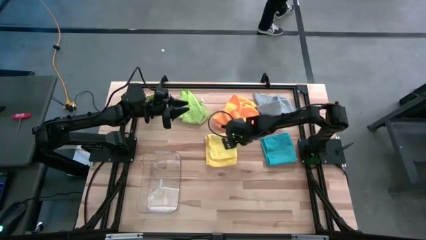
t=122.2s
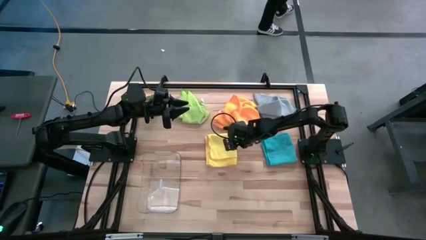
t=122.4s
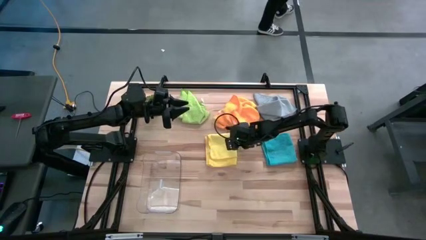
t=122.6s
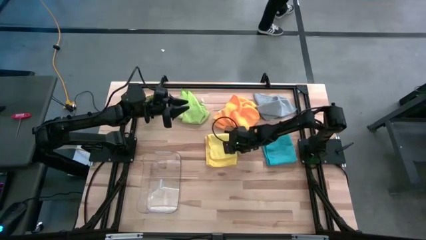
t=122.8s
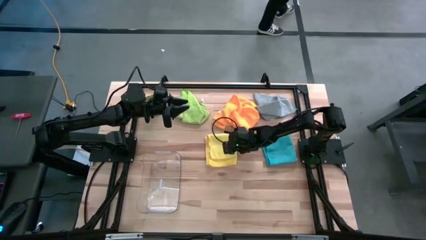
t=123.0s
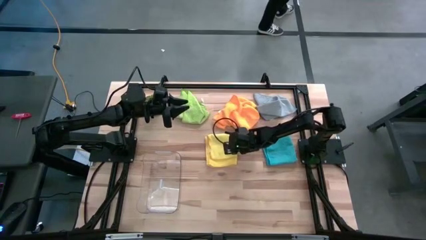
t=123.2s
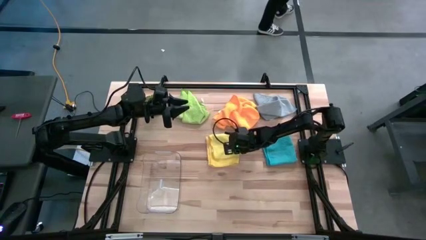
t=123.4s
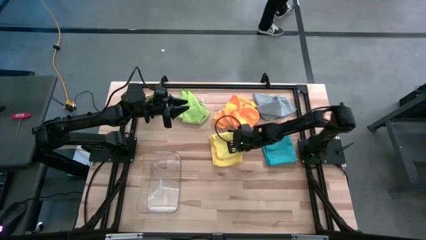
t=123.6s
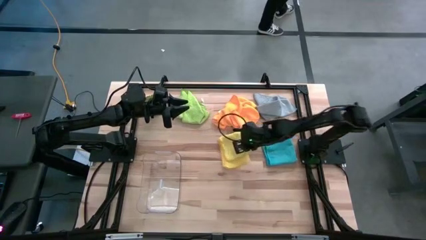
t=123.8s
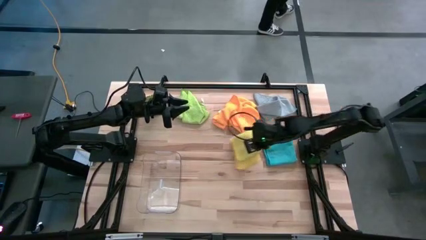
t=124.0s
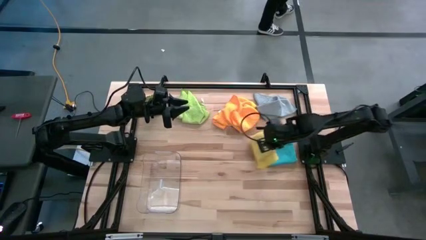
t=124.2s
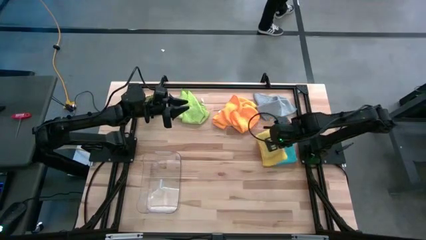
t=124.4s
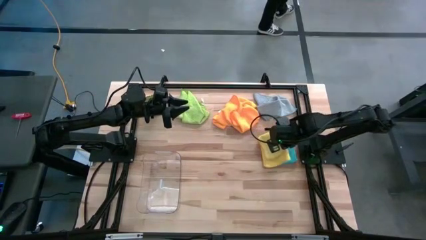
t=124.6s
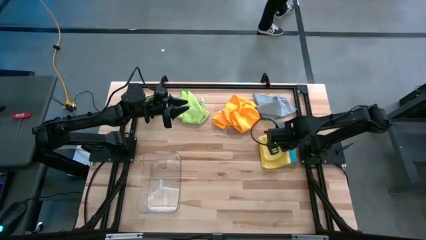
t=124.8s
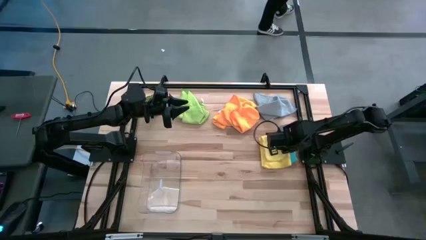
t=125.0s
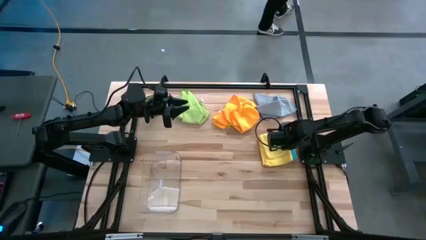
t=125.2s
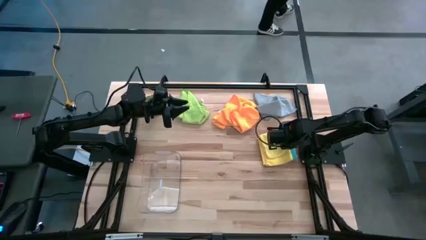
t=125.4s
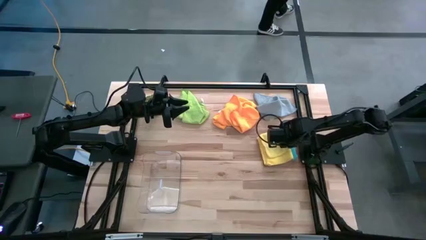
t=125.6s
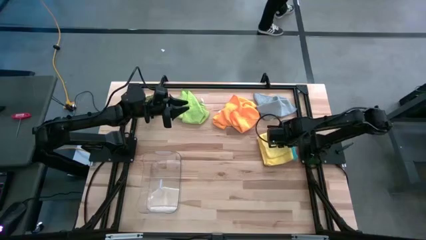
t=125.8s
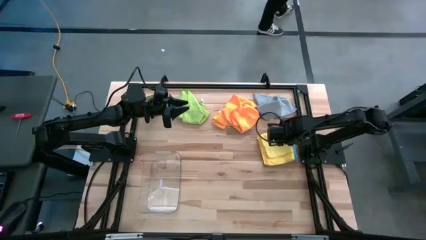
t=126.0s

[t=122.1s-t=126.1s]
Task: Fold microfiber towels
Stack the yellow towel on top of the blue towel

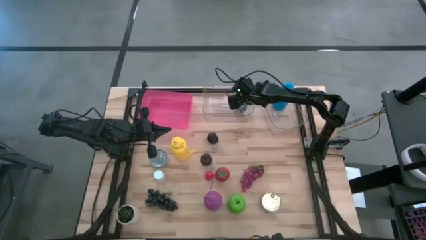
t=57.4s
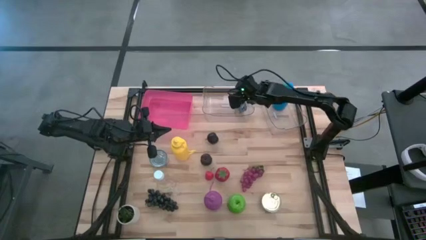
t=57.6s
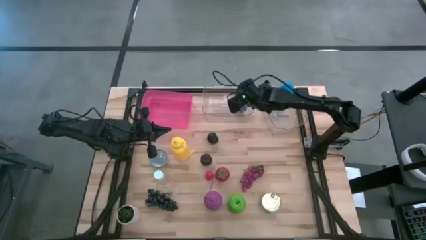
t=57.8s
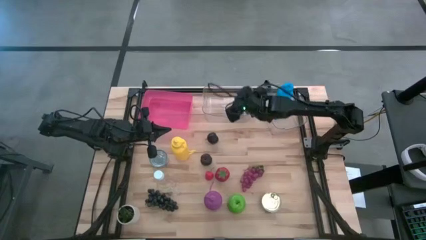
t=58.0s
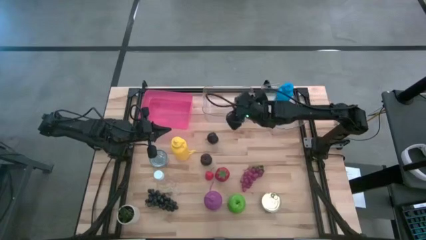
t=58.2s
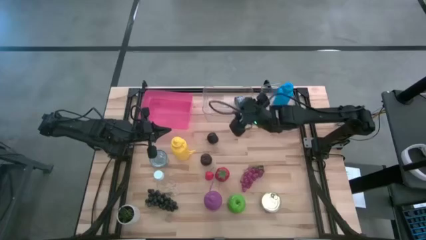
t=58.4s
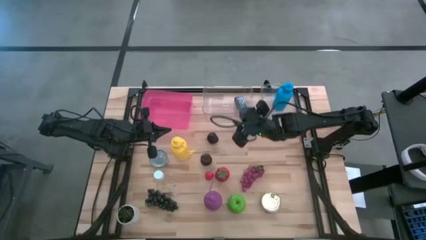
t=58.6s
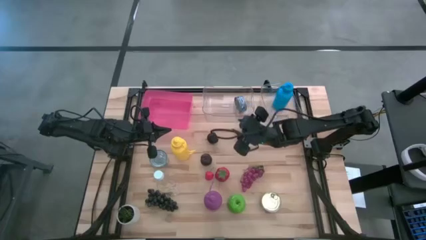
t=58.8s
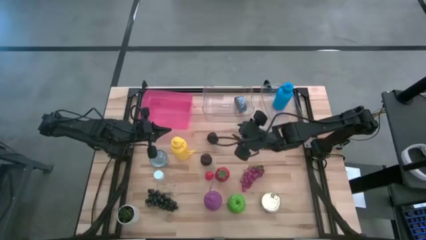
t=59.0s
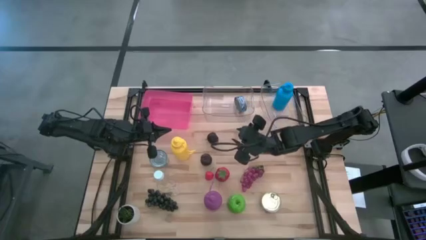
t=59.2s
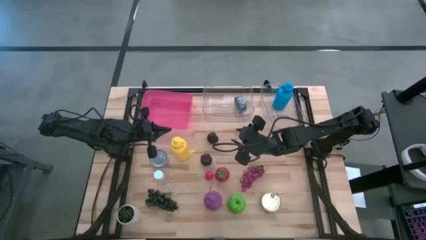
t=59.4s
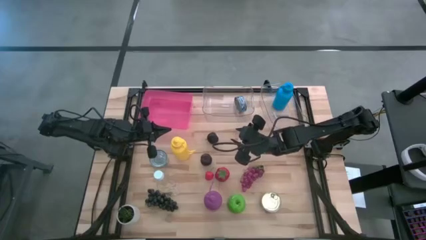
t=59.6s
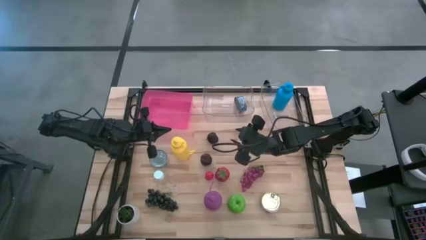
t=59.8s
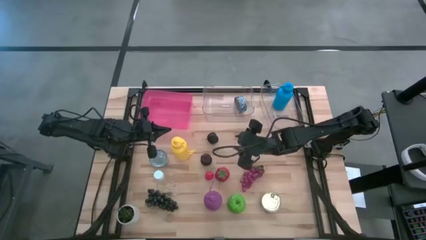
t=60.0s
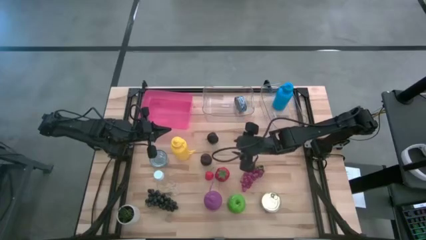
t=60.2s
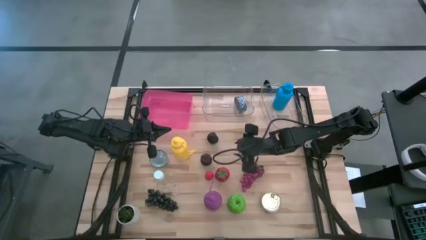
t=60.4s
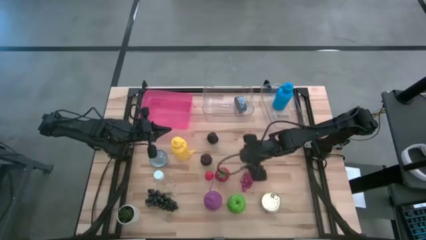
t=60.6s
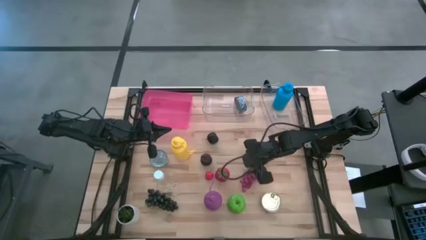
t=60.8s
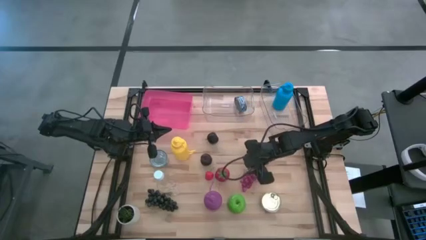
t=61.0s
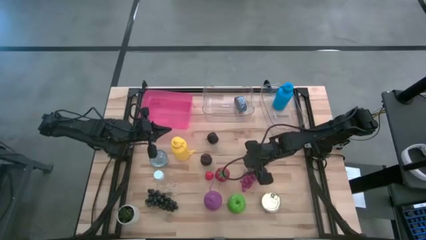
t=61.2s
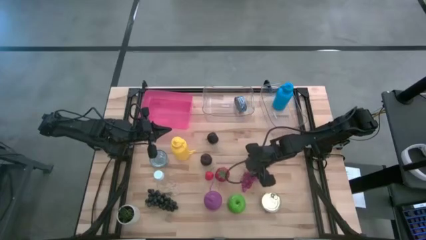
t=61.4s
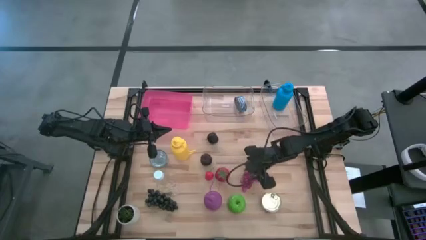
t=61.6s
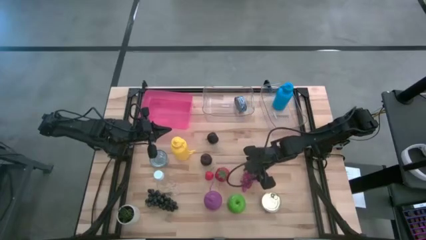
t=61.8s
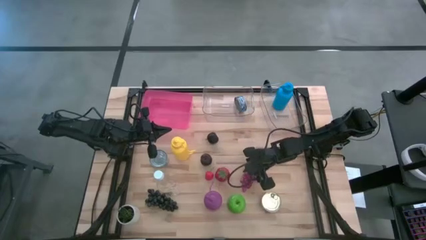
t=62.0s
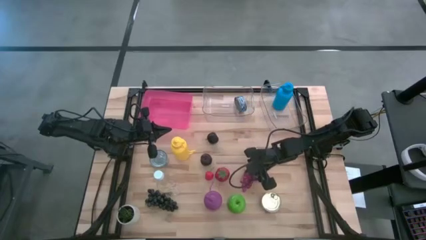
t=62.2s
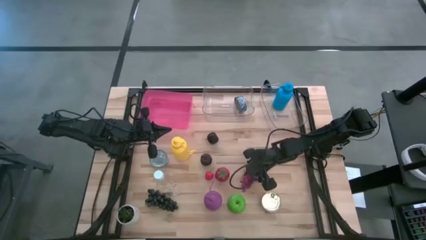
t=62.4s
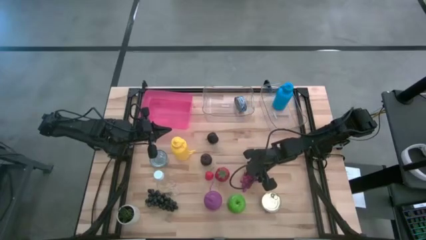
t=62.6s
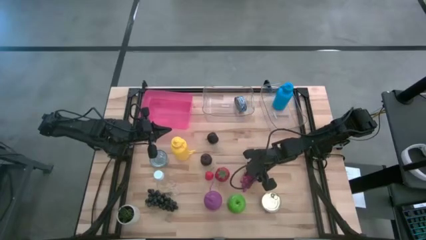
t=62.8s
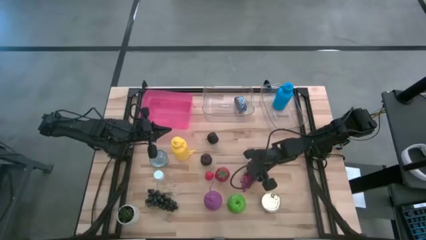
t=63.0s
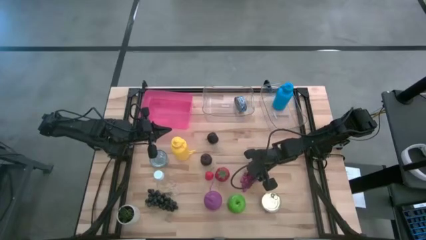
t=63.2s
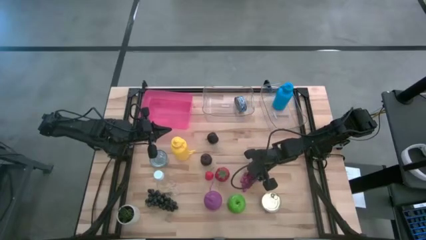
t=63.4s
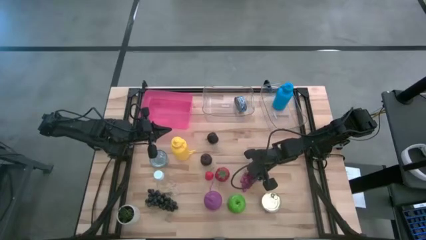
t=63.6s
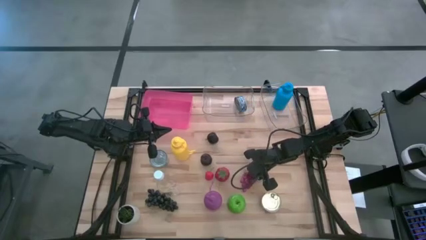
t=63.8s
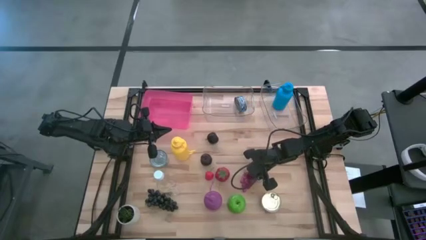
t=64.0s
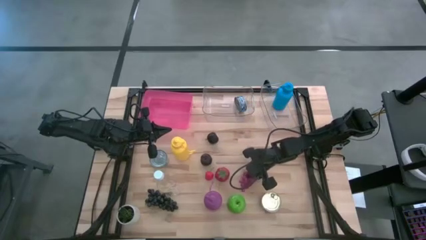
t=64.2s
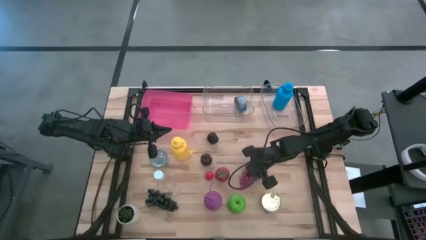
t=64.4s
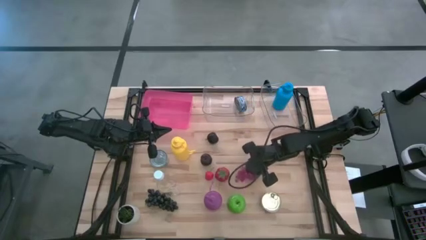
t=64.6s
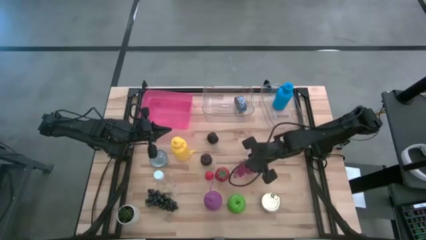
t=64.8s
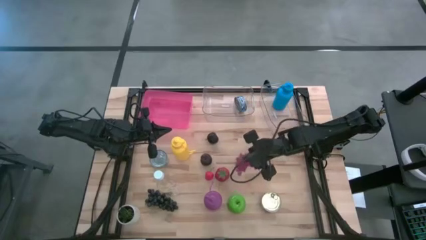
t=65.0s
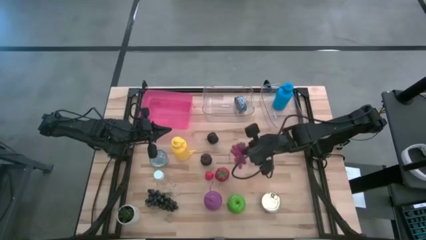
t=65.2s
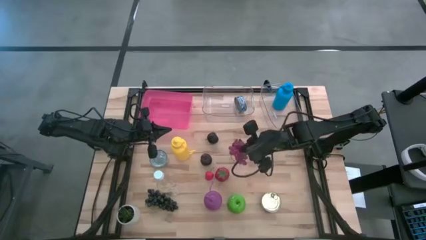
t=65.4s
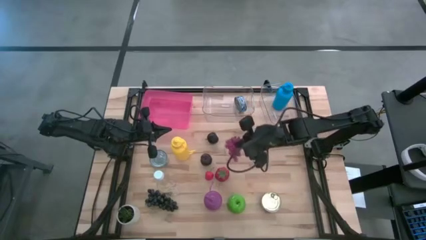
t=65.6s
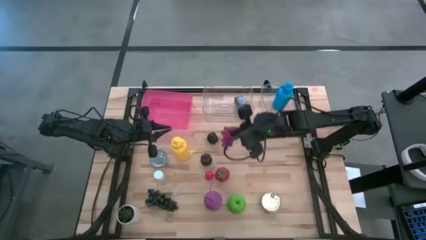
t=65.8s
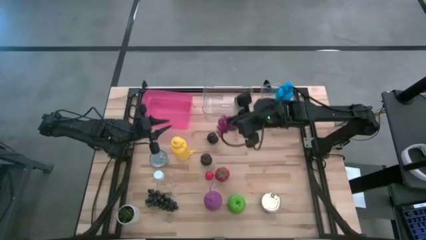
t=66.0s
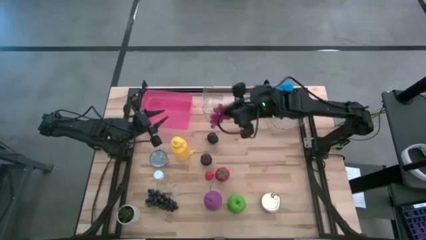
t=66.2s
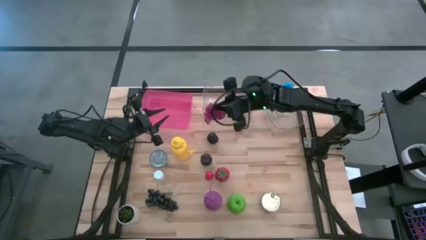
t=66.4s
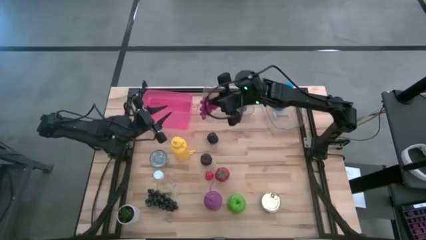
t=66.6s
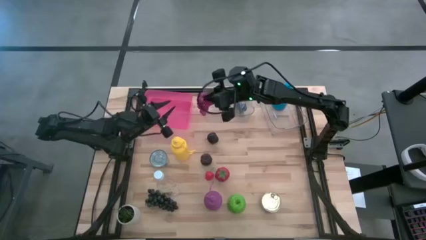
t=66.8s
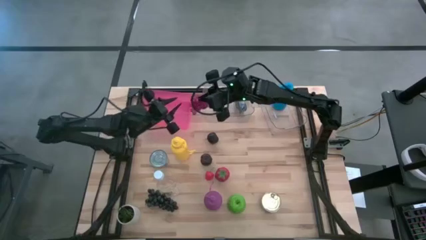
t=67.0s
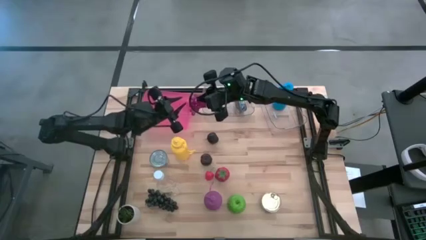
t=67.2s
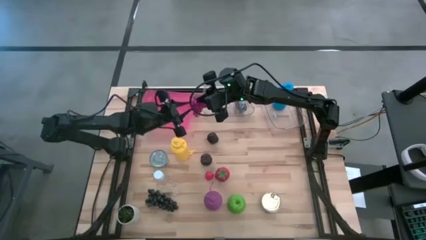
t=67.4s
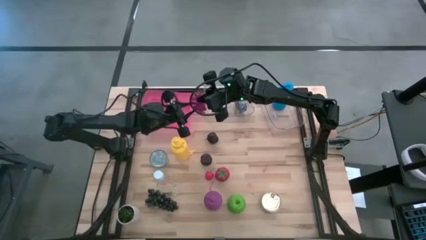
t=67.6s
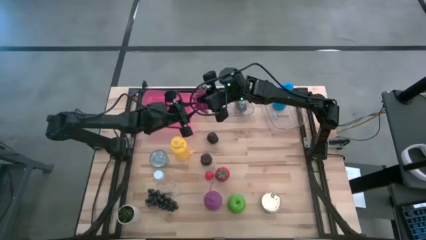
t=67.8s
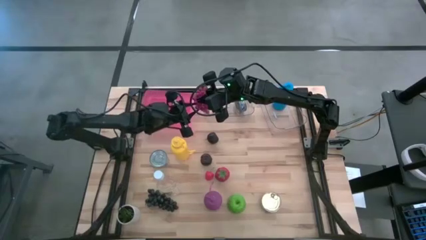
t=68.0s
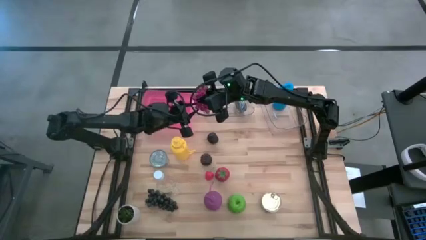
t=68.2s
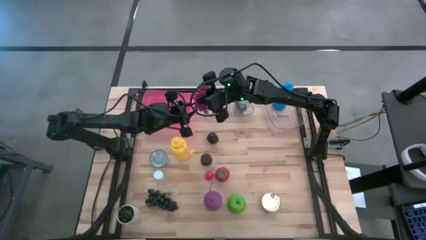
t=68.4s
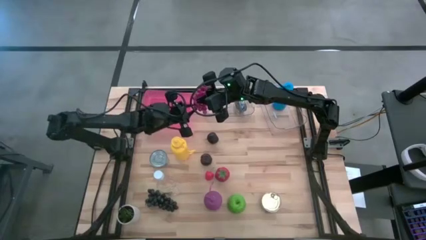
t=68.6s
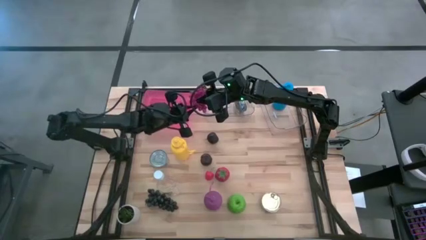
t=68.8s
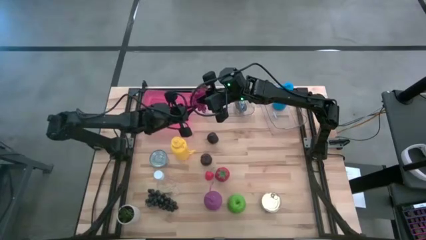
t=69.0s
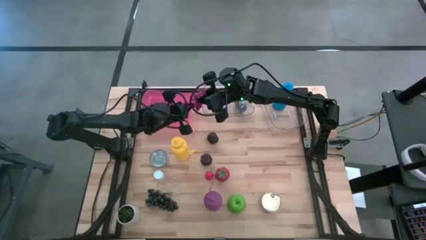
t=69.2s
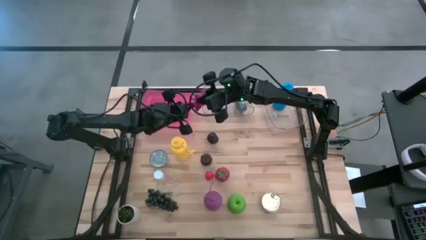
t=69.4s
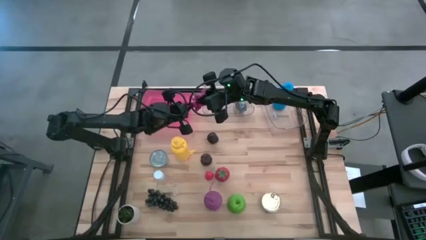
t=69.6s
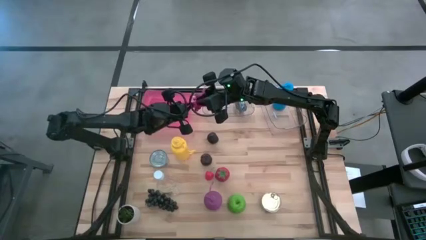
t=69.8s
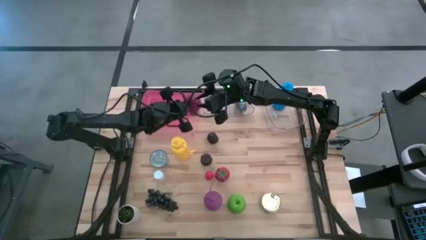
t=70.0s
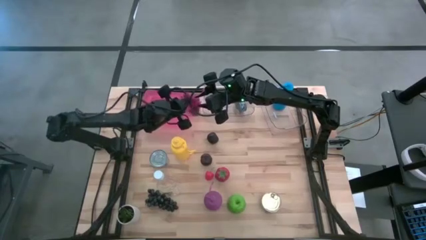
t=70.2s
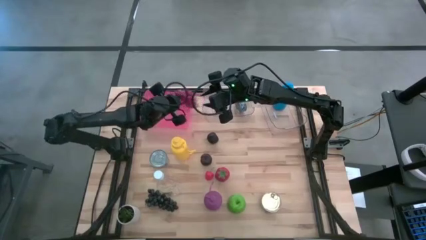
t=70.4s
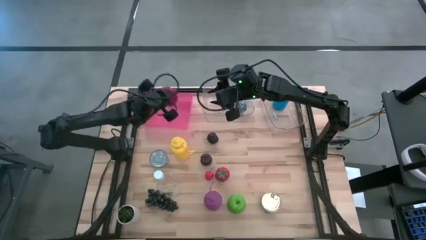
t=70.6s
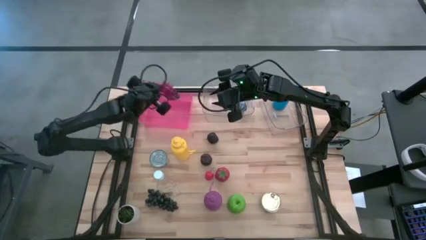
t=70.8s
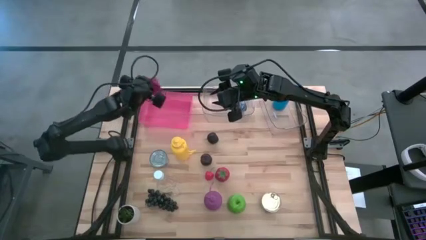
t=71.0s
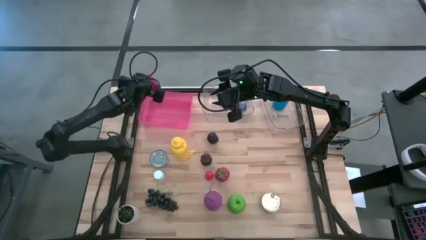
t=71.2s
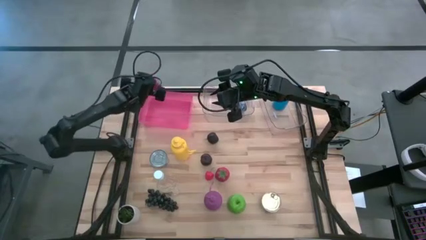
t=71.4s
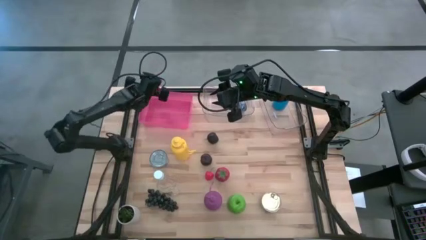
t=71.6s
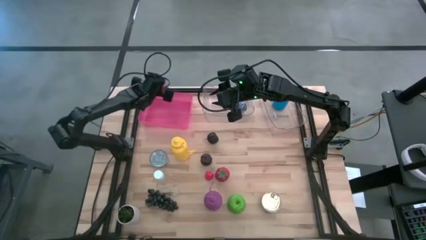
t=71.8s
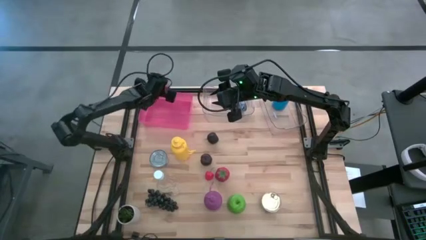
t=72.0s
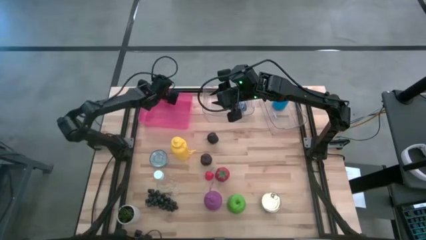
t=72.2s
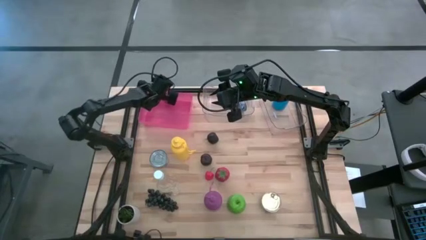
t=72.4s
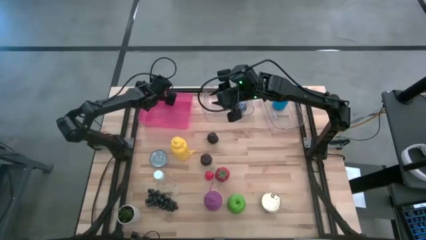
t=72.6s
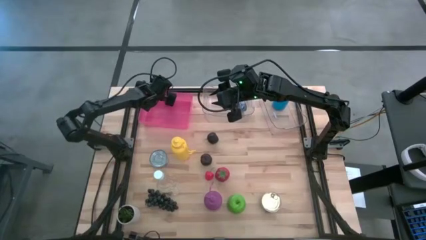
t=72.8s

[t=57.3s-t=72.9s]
Task: Pick & Place Food Item
Put the red grapes into the pink bin
